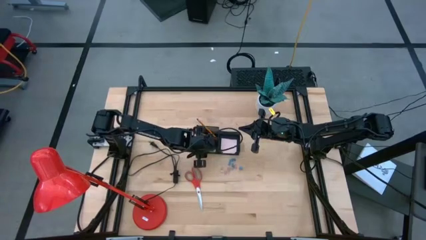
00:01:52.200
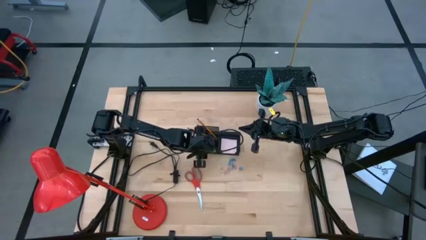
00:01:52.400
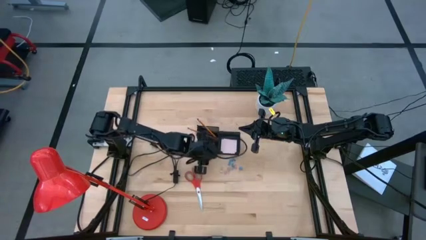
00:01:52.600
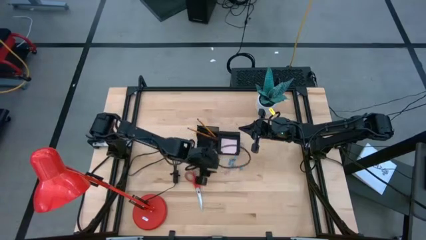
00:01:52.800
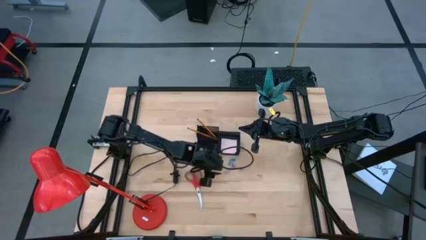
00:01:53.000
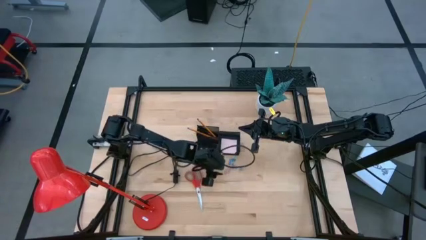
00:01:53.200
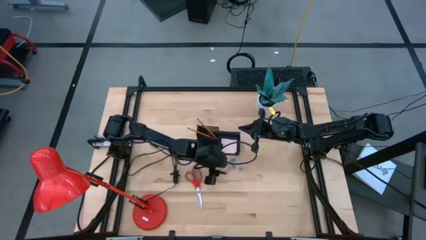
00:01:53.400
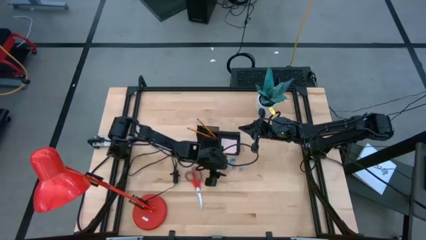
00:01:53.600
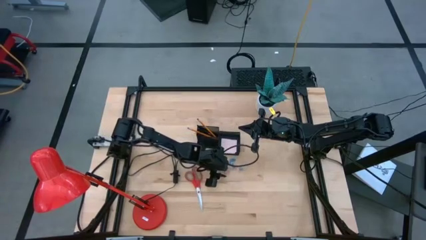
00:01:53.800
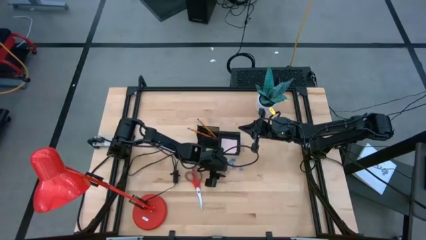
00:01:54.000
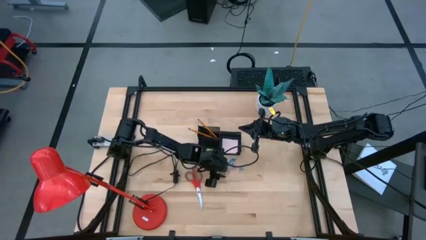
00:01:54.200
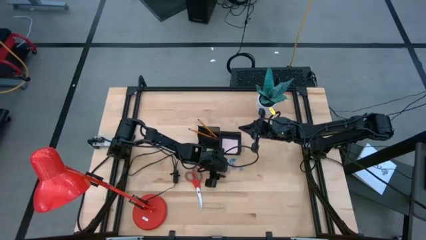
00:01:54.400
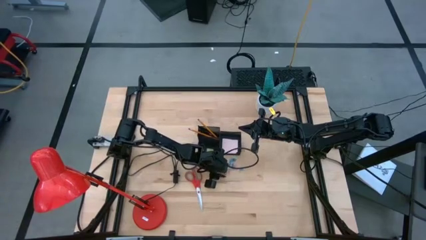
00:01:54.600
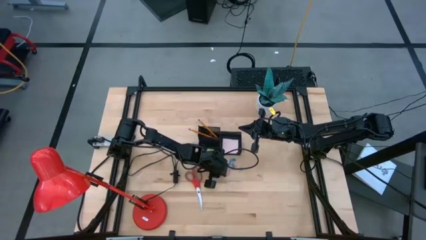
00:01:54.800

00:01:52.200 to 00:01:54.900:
Task: Pick and place office supplies into organizer
Put the pink binder clip into the black desk organizer

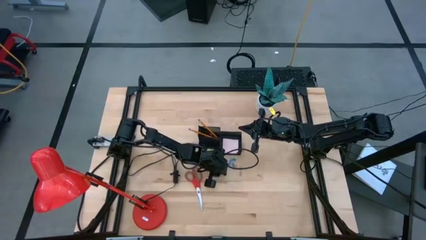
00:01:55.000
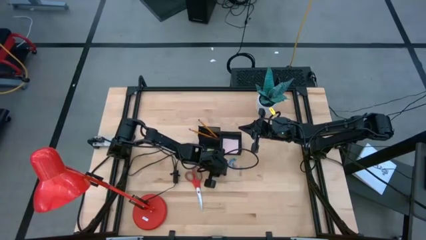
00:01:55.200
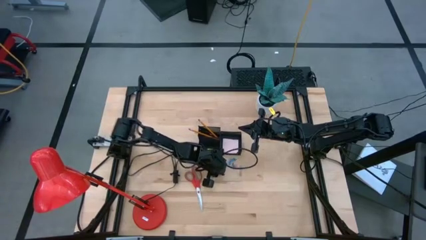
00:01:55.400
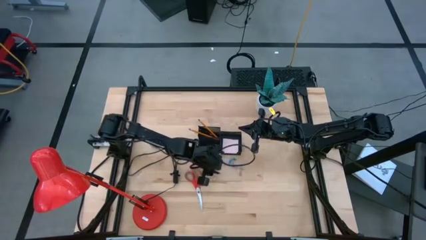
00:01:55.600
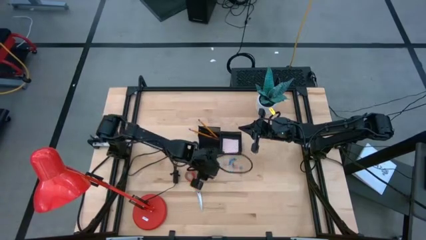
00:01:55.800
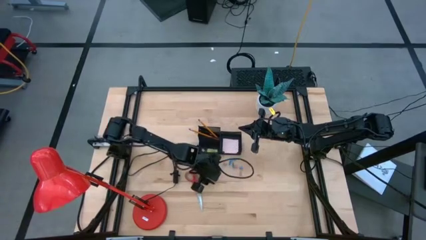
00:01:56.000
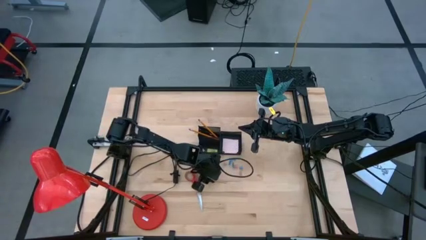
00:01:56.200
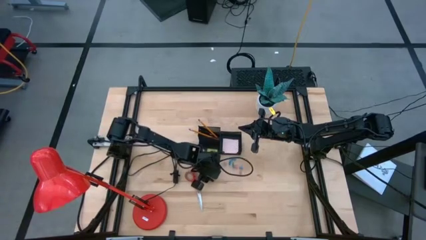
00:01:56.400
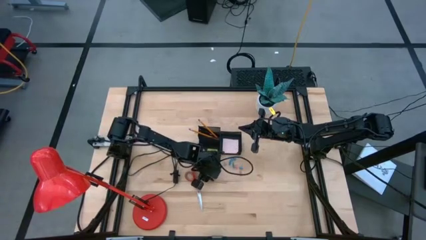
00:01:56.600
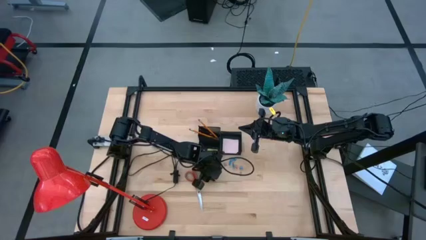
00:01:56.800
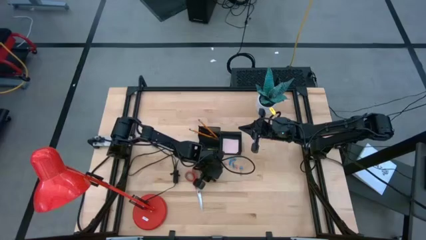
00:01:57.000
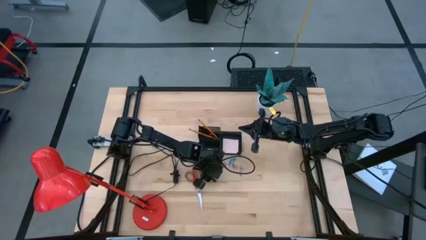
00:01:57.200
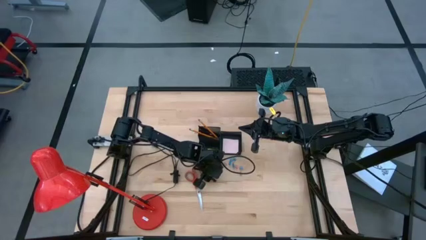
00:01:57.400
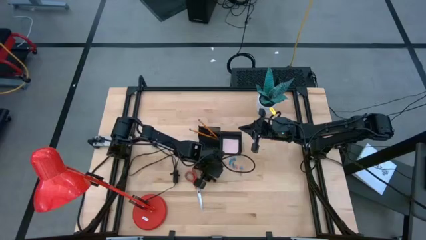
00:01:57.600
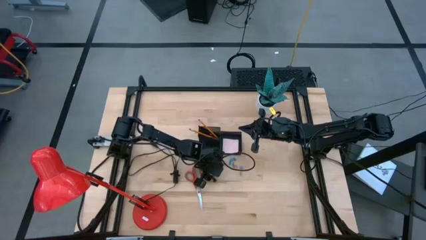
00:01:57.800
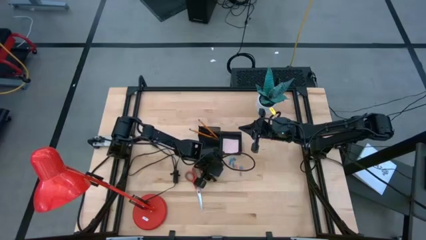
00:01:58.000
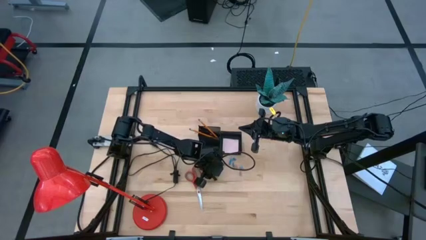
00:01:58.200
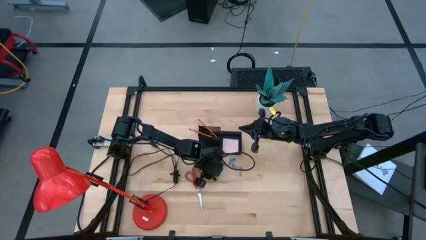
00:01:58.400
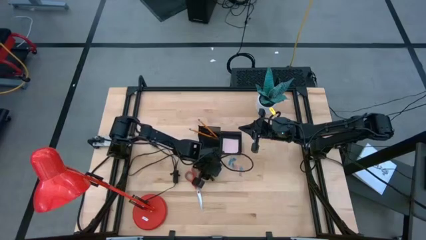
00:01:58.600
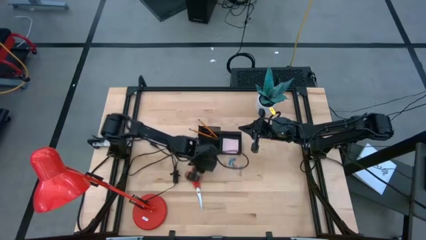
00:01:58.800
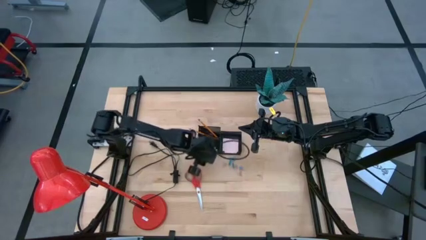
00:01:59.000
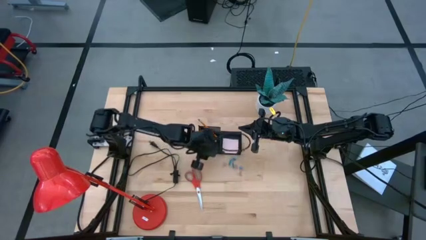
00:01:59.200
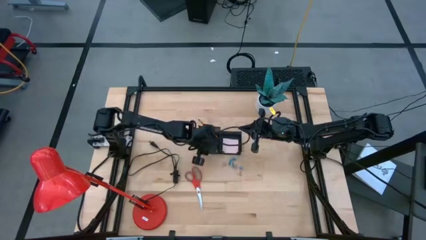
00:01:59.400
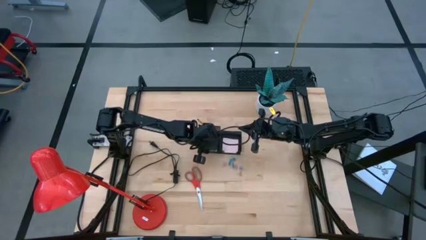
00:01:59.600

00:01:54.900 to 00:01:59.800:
Put the gray binder clip into the black desk organizer

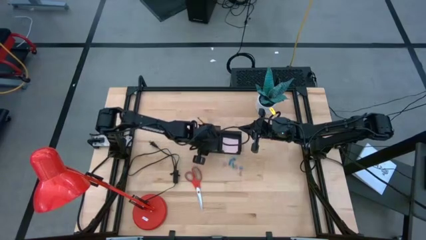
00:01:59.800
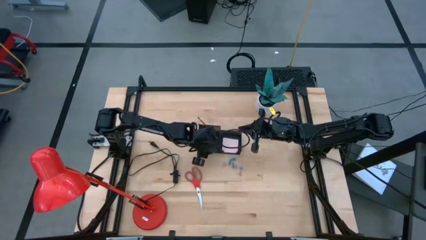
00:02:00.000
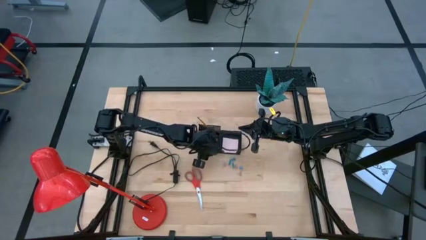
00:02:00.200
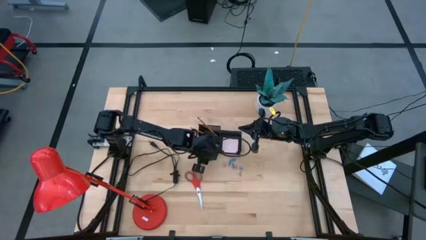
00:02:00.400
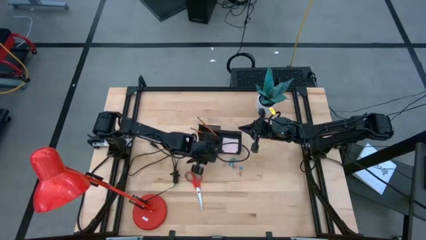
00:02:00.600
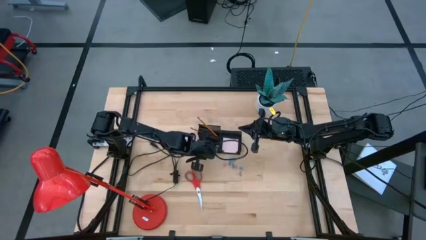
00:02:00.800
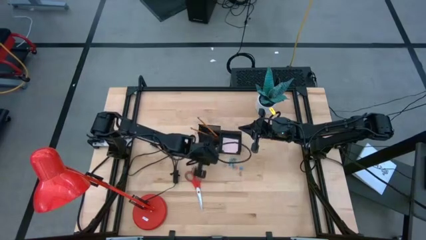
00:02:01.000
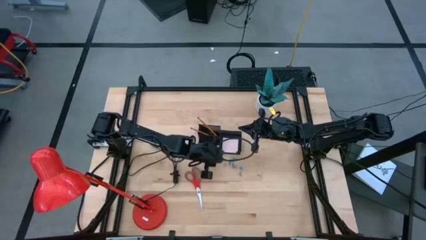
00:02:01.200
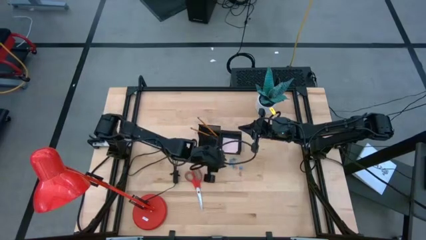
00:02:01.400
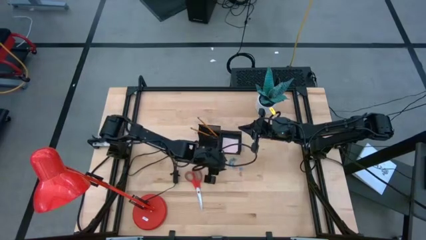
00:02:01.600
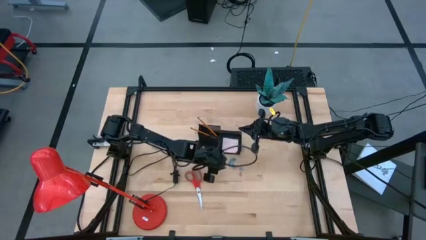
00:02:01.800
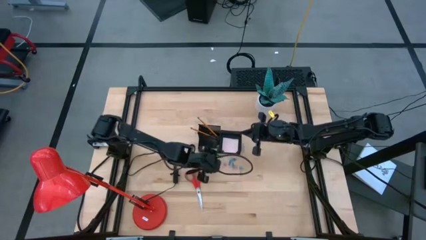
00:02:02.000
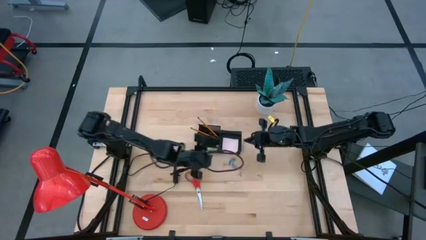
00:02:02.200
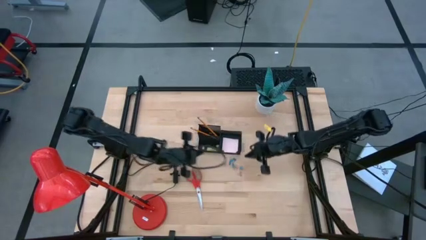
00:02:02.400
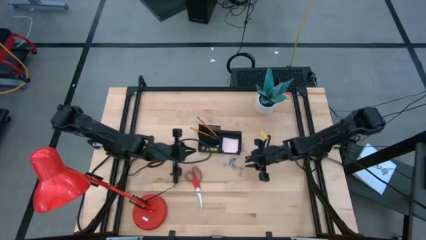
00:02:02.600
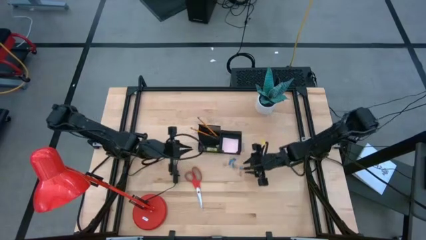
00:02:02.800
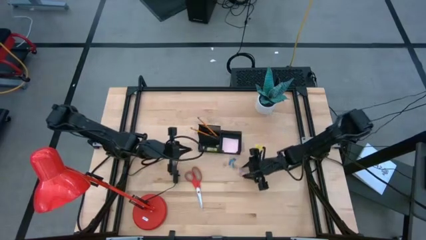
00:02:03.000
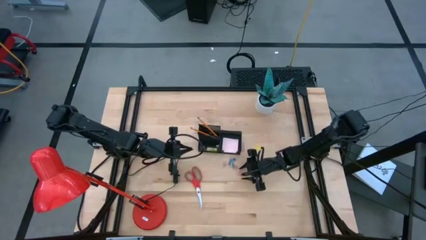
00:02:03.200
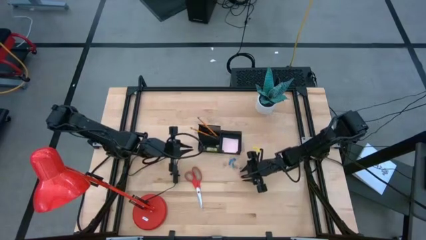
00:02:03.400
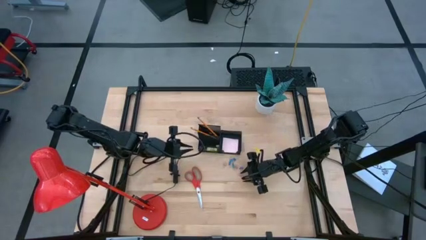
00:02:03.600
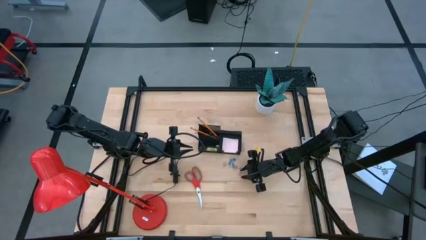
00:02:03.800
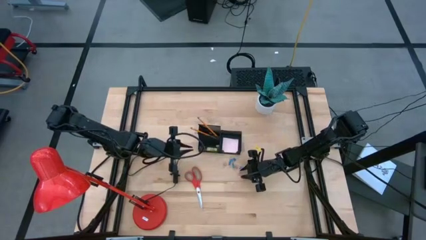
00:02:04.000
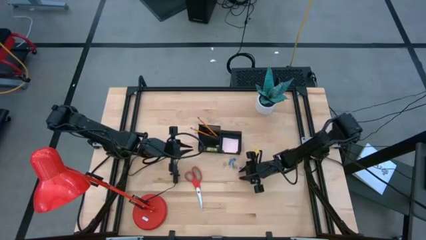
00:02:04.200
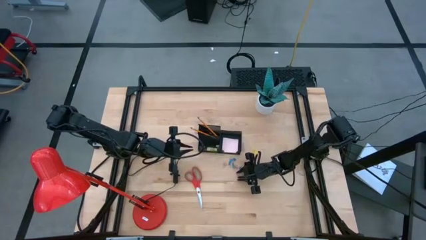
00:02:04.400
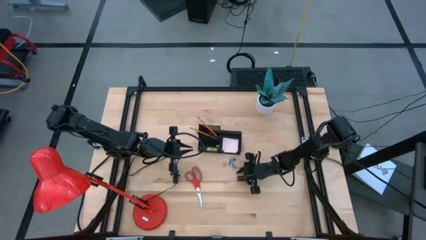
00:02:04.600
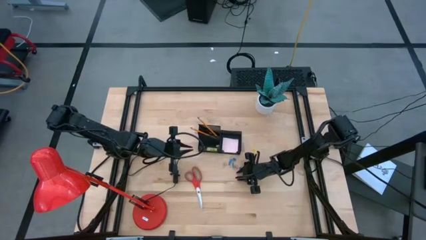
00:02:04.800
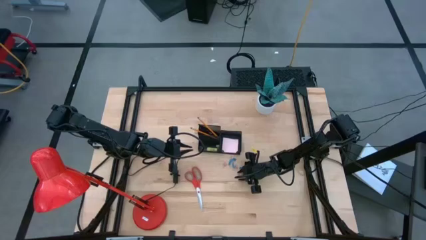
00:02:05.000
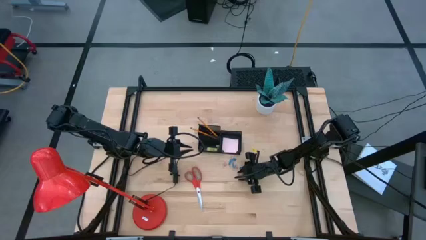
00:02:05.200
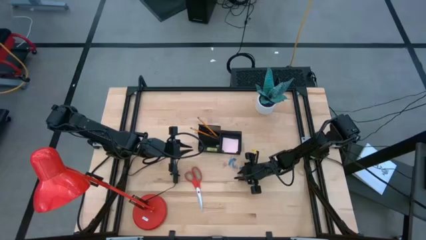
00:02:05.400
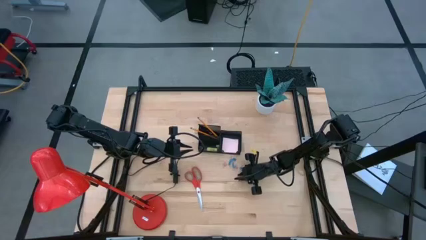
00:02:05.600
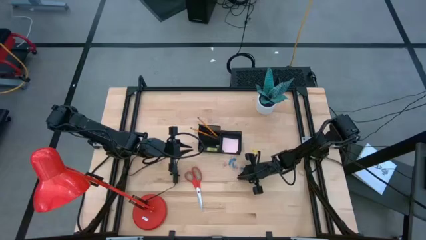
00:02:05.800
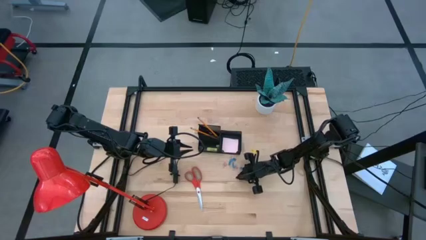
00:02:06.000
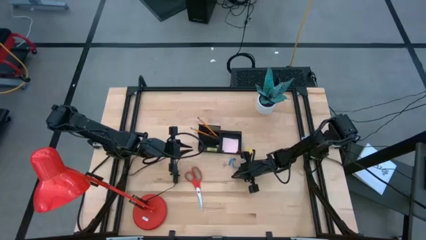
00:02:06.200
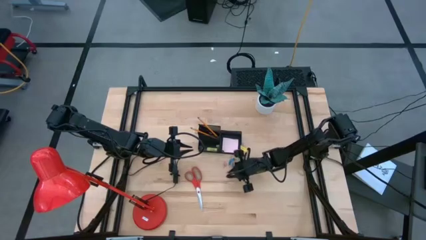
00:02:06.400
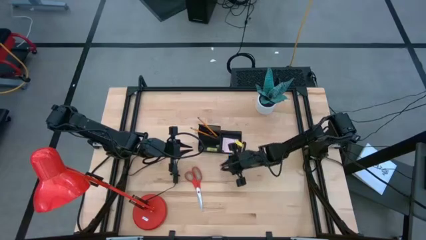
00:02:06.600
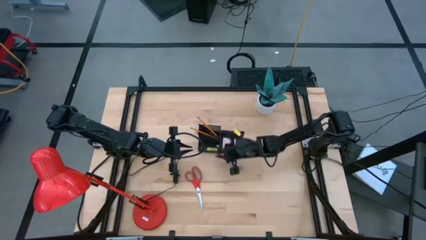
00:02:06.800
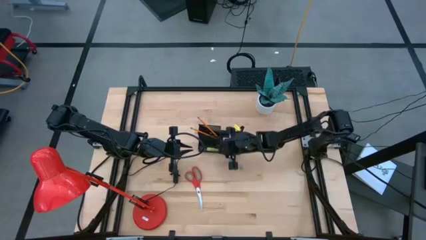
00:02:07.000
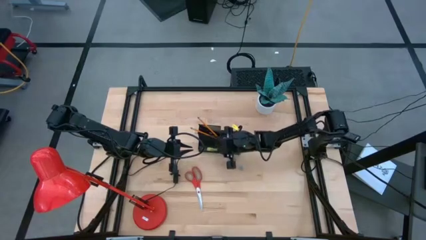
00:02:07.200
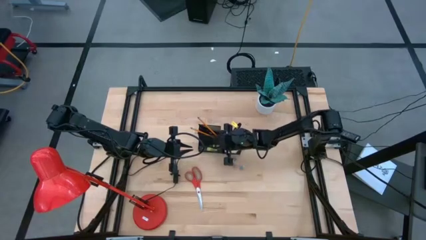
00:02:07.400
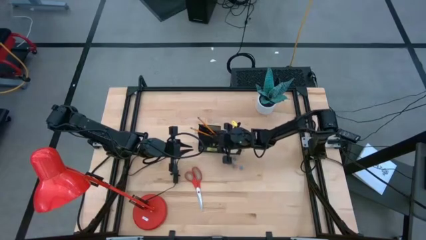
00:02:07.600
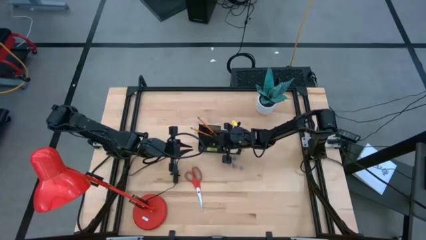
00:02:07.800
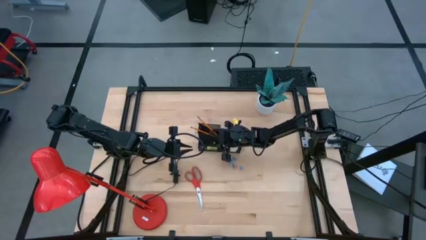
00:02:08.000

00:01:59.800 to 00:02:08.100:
Put the pink binder clip into the black desk organizer

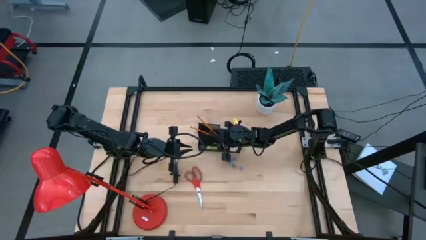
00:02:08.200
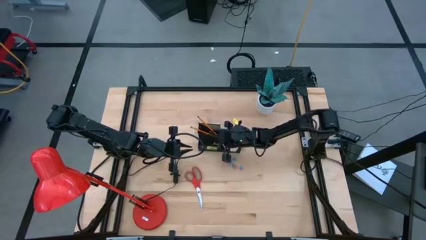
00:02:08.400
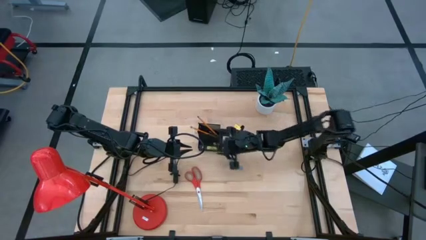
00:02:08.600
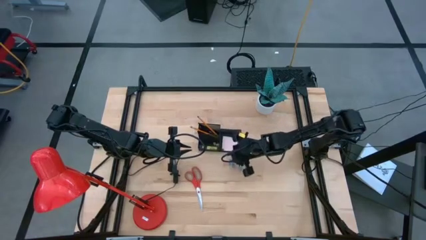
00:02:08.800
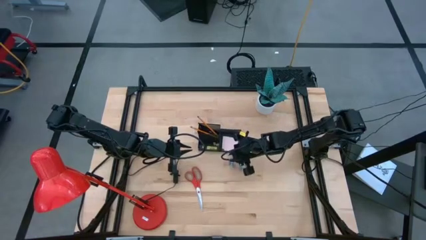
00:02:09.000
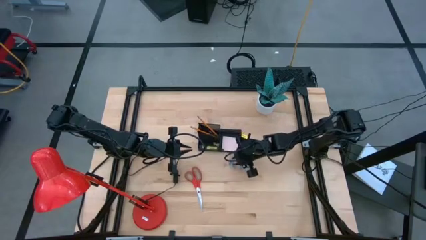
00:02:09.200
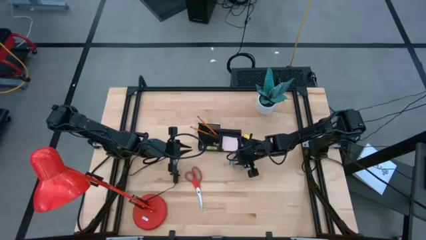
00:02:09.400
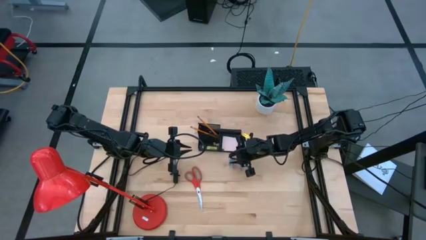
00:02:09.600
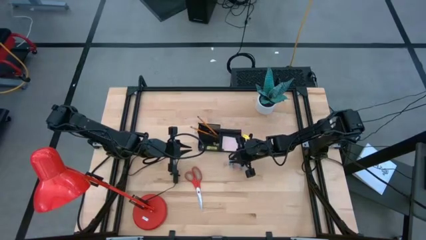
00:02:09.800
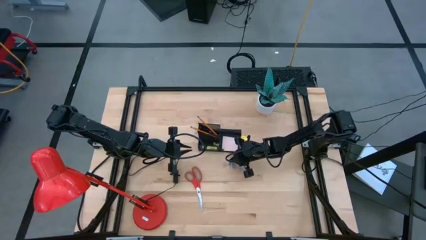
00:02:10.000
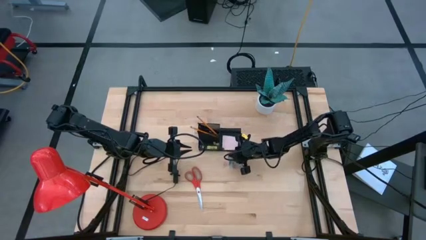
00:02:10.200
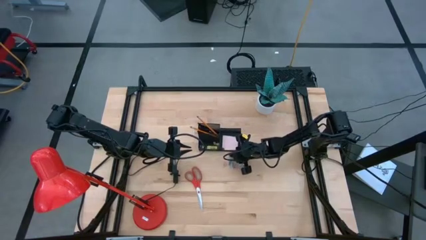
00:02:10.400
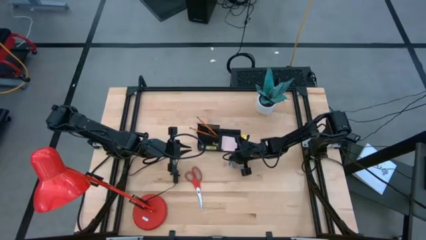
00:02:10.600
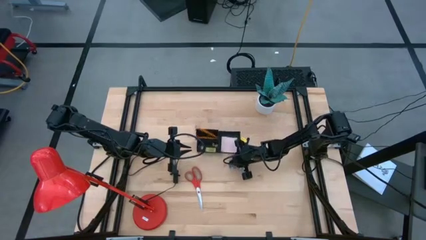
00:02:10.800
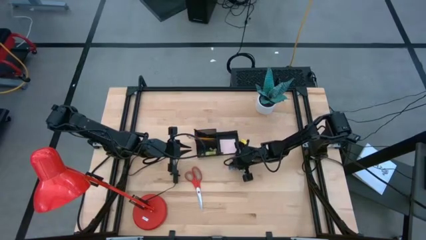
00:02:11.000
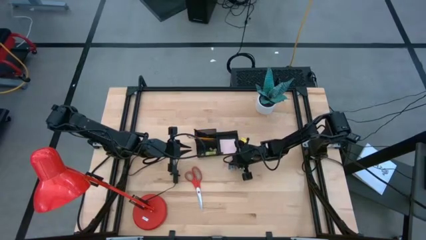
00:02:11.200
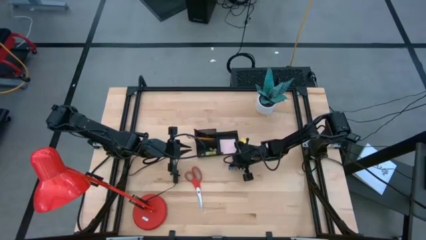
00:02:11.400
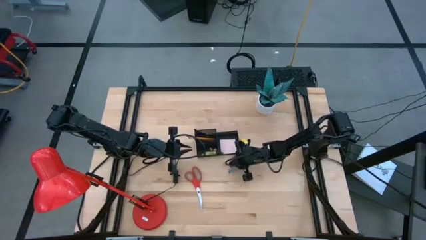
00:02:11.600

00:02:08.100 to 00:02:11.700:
Adjust the blue binder clip on the table
